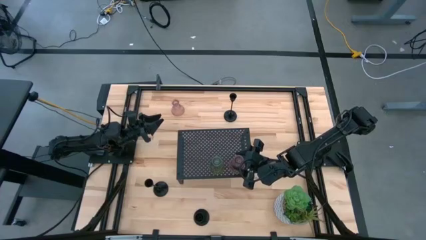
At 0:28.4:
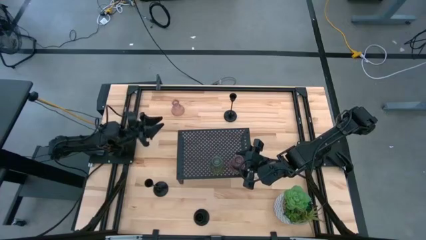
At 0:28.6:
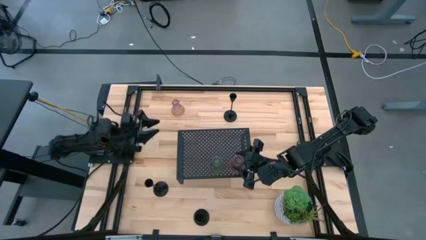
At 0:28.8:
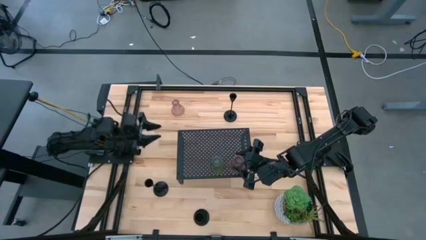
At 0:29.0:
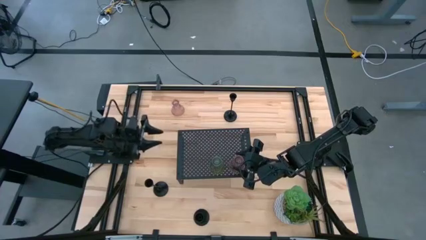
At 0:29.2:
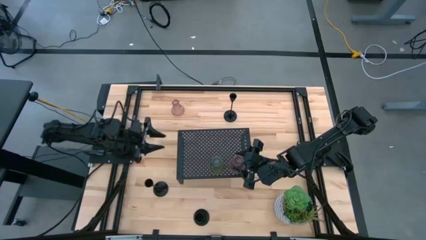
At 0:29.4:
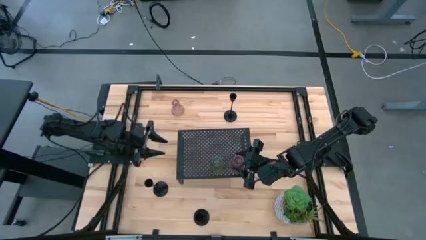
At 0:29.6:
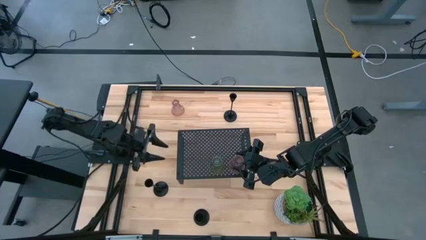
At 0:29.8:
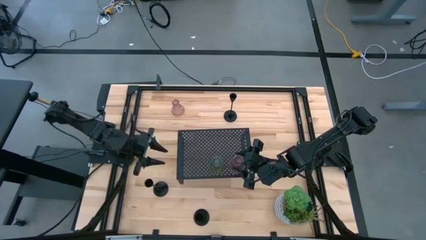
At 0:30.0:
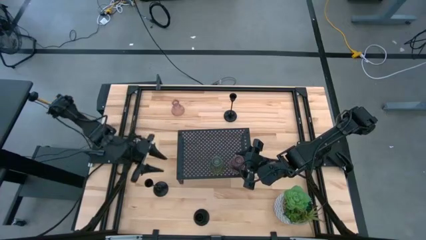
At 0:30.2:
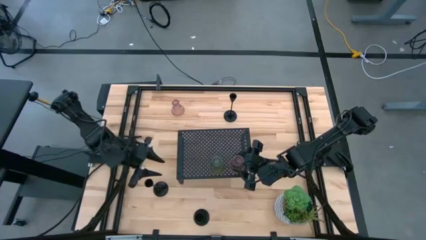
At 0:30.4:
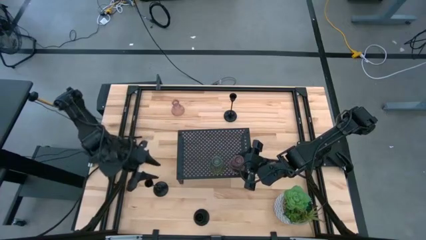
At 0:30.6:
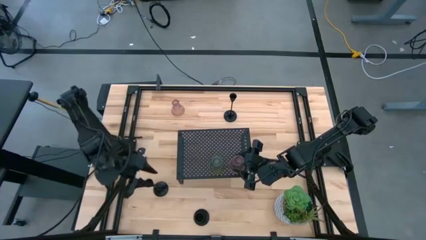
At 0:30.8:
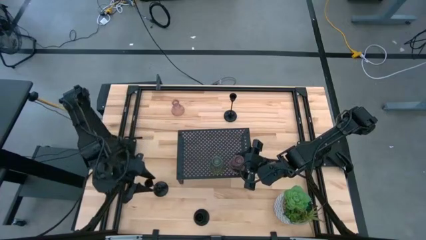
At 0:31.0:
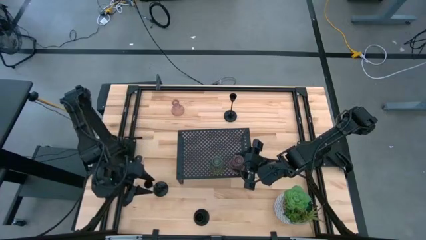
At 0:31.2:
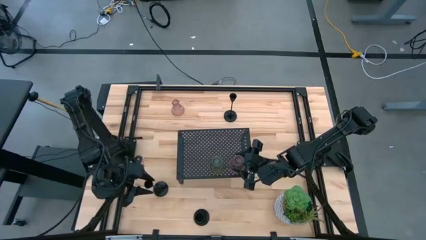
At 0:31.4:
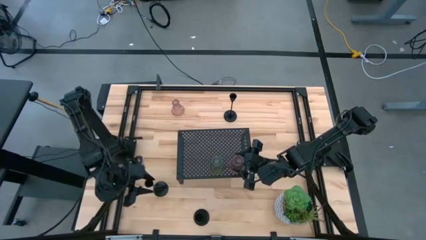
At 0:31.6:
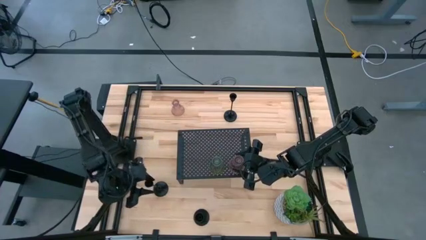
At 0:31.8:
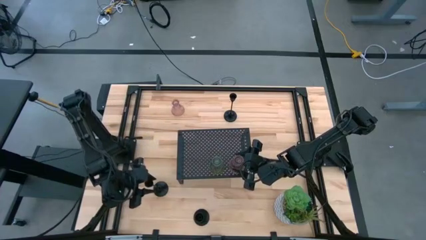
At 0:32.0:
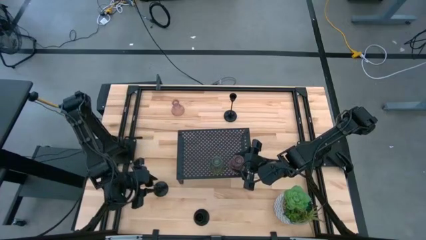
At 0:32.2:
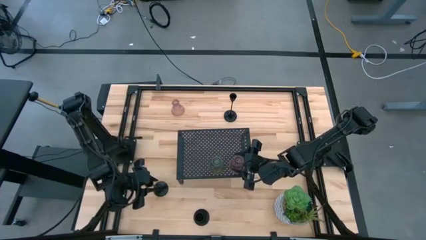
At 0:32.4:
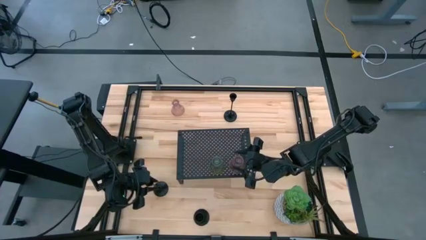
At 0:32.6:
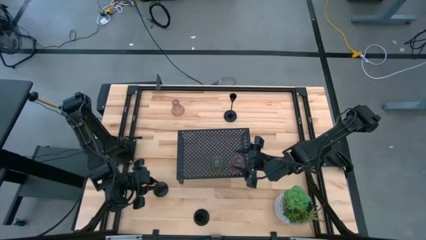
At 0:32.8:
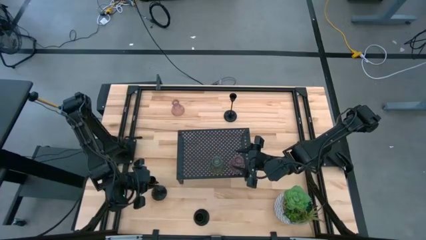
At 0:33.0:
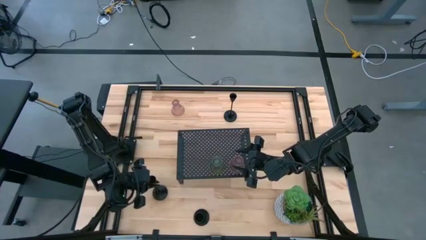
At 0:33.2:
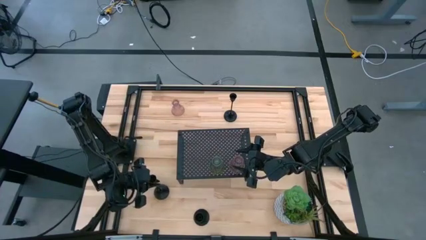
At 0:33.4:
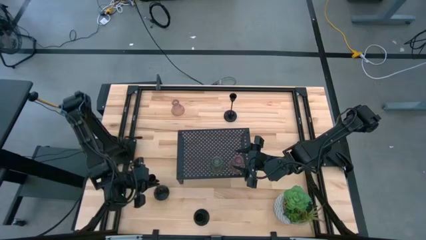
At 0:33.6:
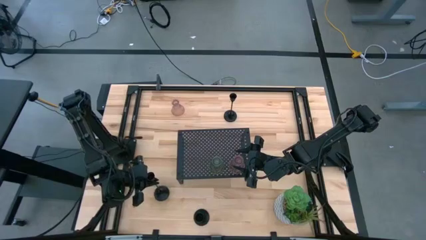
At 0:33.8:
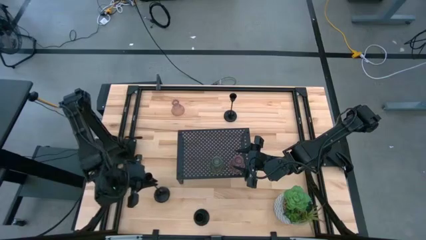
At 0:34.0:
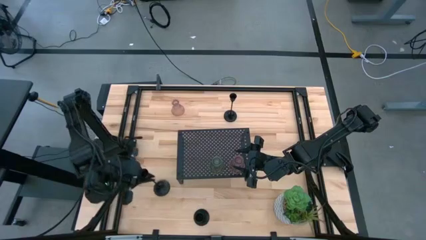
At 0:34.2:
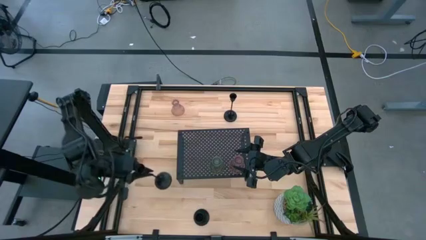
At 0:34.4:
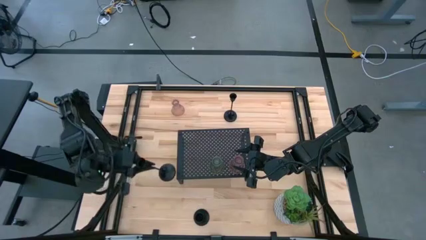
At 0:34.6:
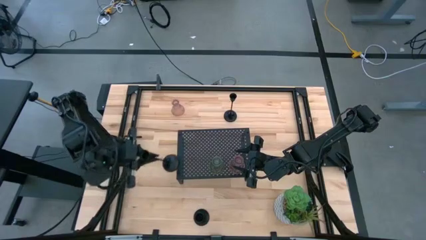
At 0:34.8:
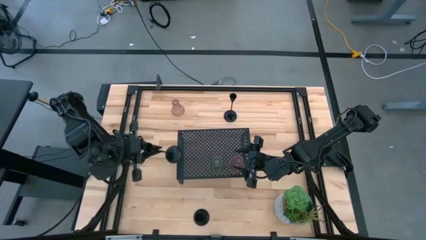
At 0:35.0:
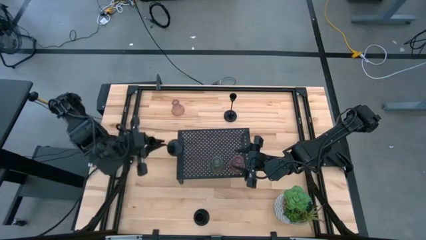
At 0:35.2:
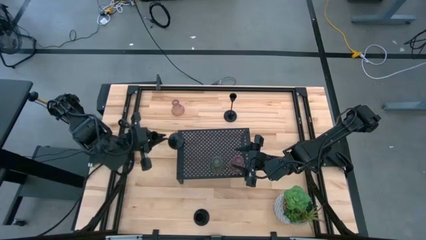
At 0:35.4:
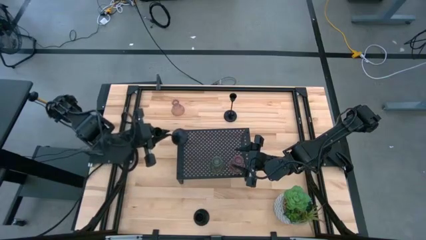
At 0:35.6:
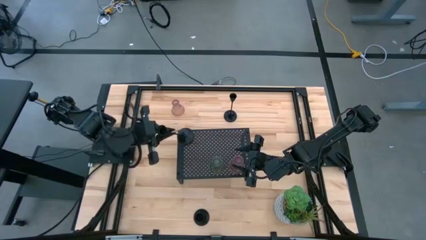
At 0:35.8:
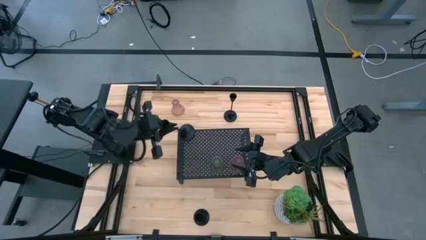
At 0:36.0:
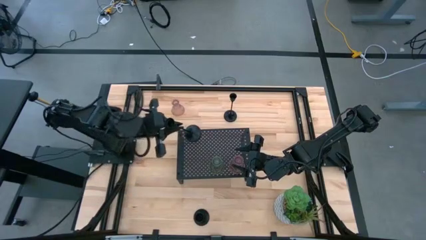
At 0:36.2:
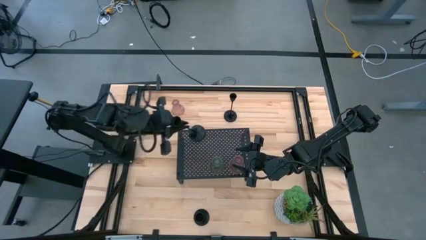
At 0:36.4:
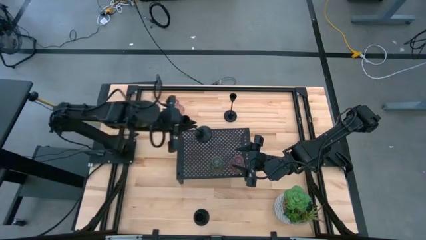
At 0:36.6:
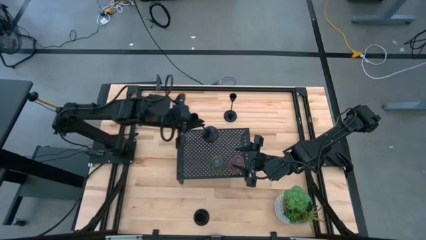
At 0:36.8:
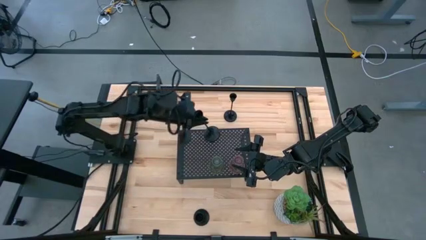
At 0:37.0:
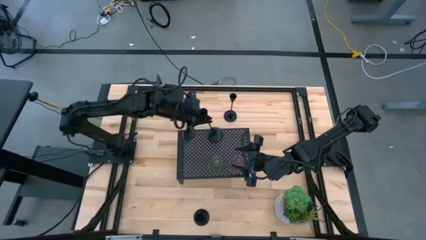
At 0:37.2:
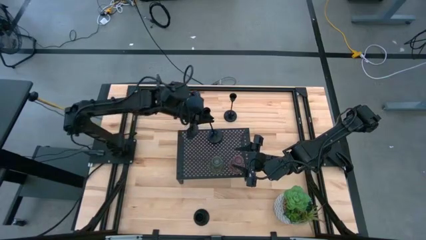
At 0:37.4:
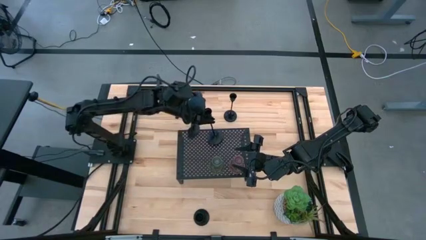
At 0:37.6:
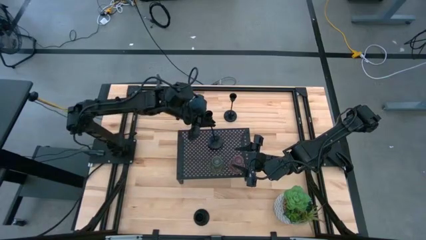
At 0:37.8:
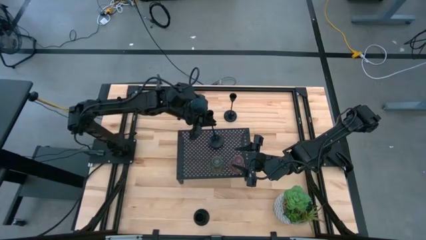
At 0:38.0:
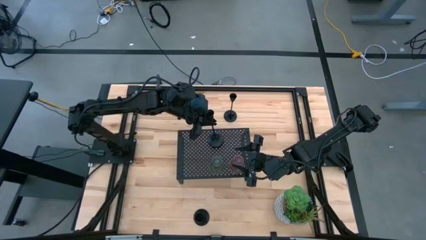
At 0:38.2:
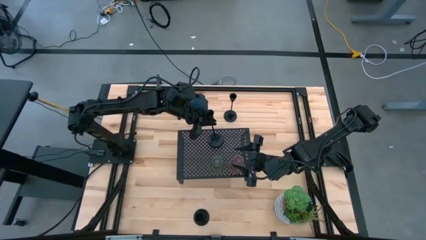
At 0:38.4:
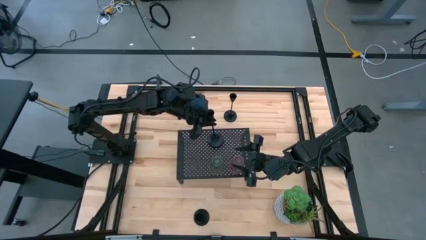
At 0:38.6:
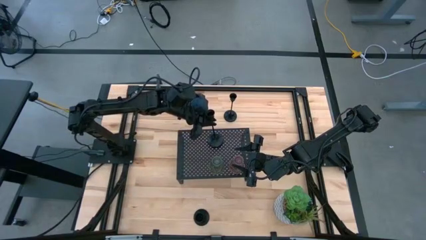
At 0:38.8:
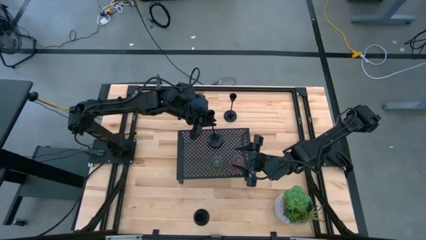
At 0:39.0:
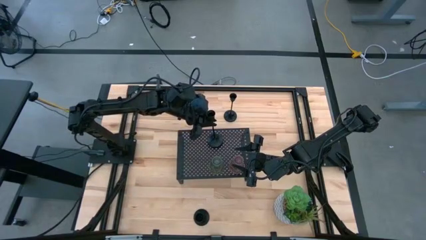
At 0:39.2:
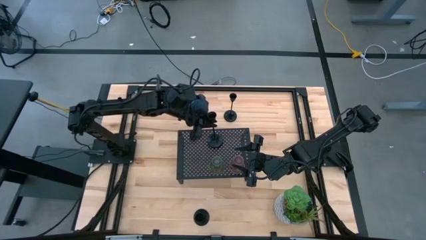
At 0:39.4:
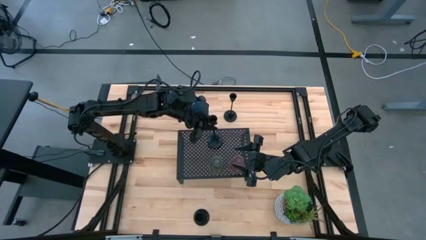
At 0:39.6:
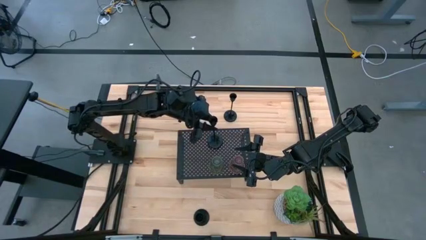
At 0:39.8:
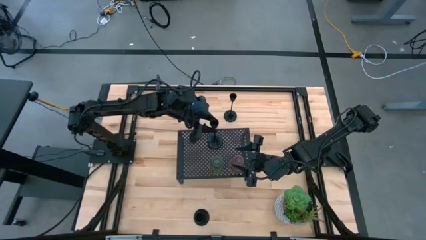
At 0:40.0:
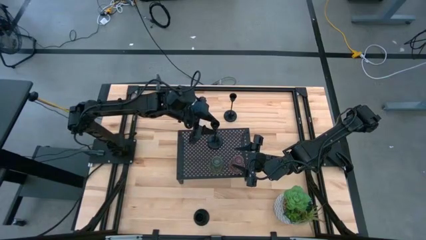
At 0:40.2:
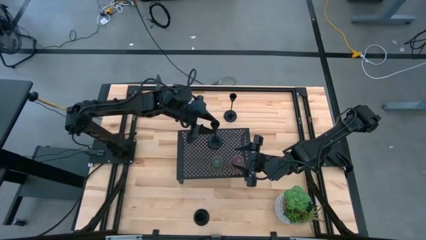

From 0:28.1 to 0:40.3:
Task: Pick & Place candle stick holders
Put the middle left black candle holder on the shelf
